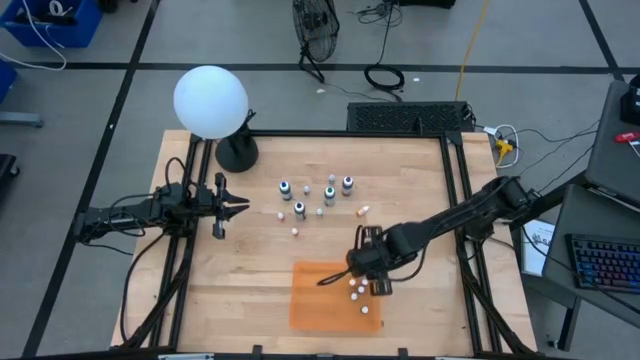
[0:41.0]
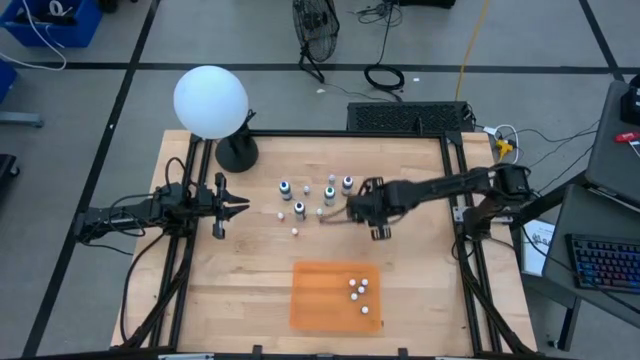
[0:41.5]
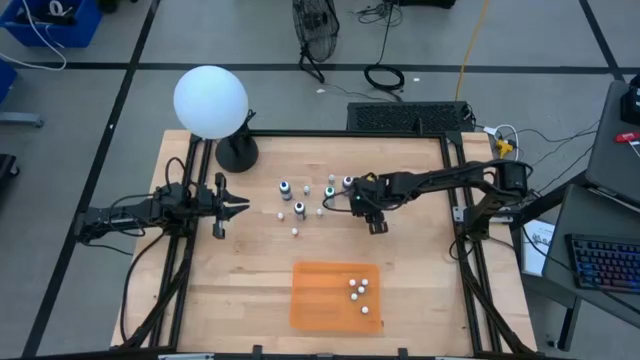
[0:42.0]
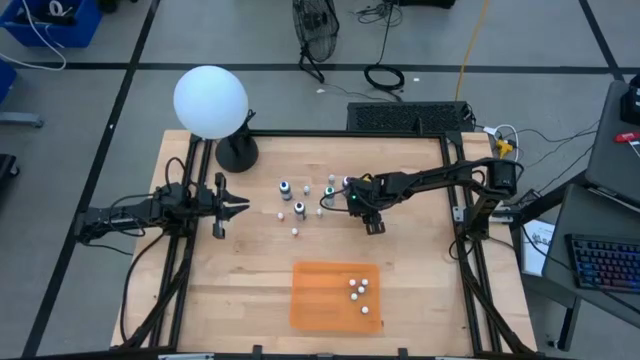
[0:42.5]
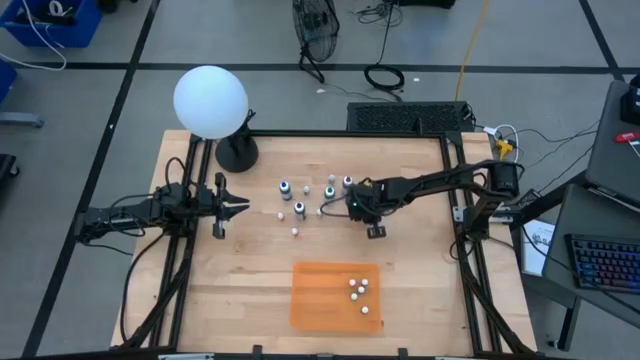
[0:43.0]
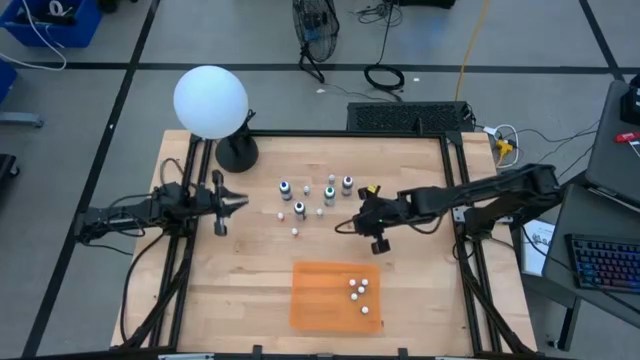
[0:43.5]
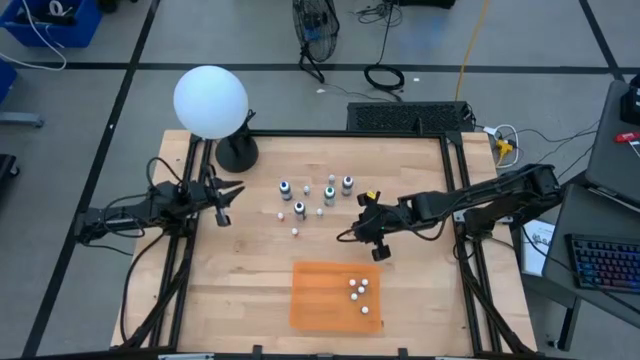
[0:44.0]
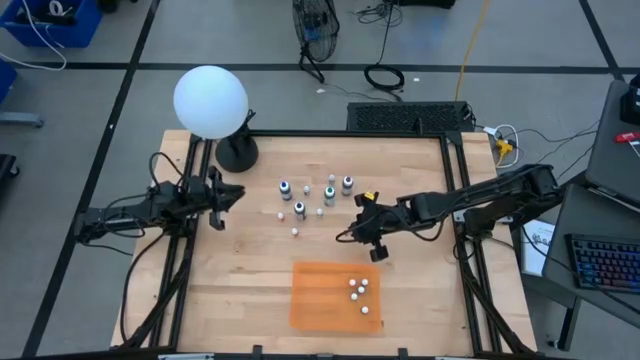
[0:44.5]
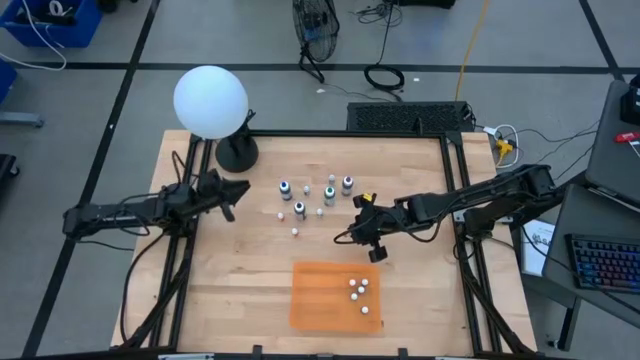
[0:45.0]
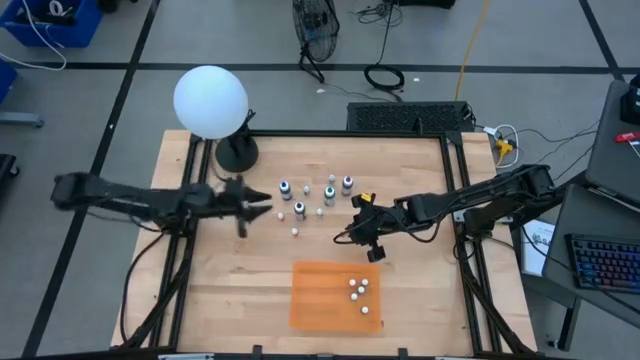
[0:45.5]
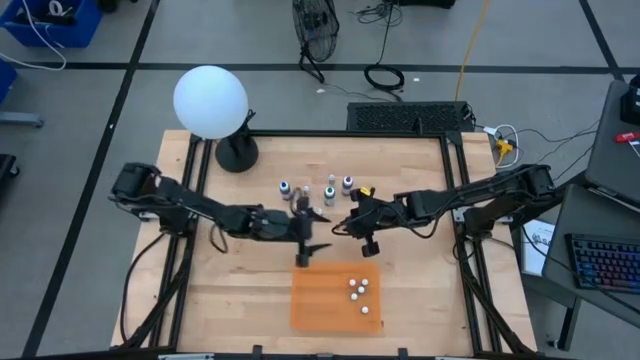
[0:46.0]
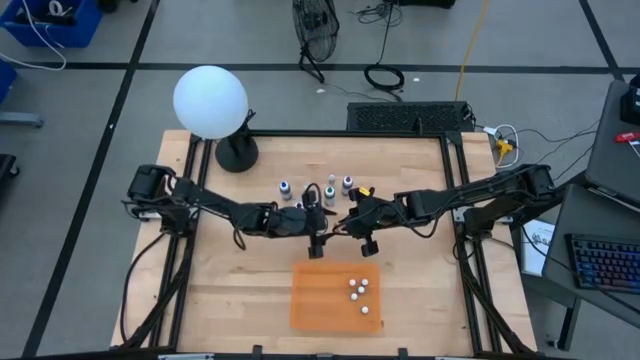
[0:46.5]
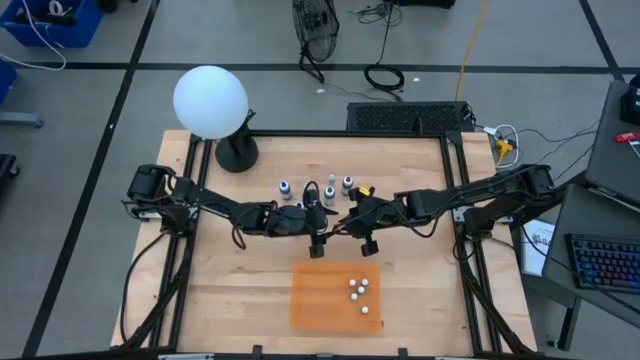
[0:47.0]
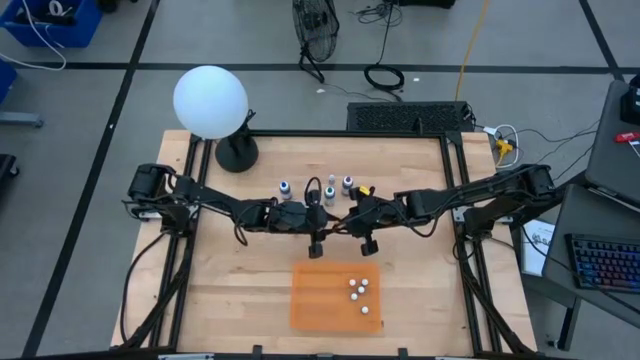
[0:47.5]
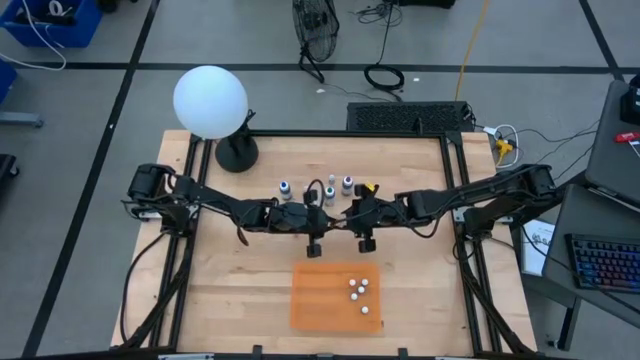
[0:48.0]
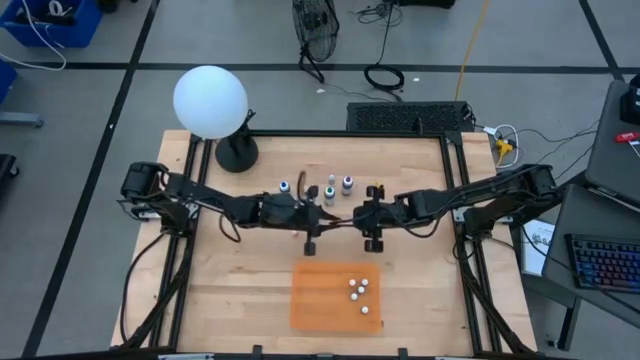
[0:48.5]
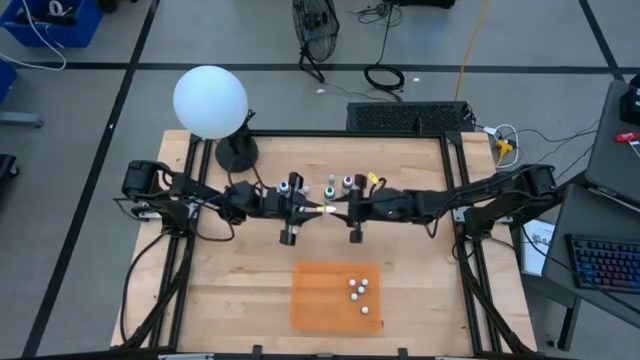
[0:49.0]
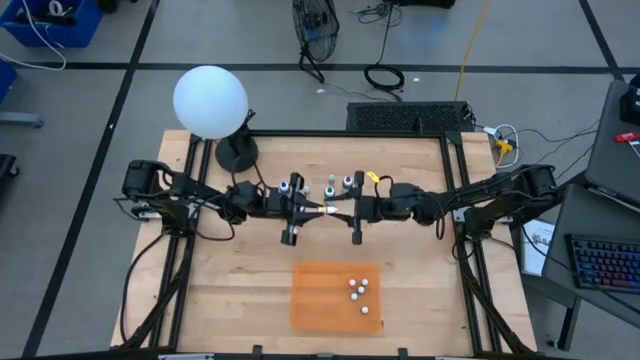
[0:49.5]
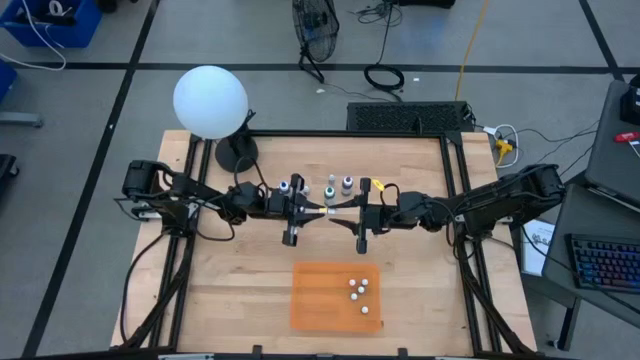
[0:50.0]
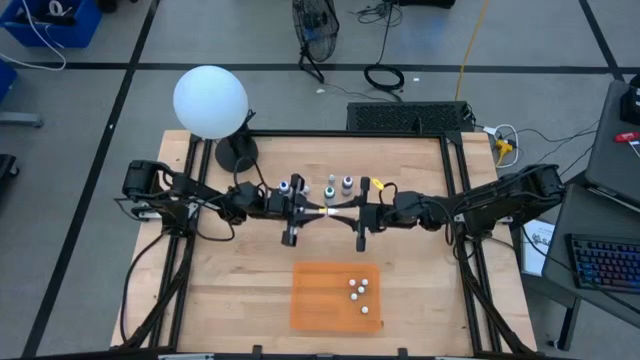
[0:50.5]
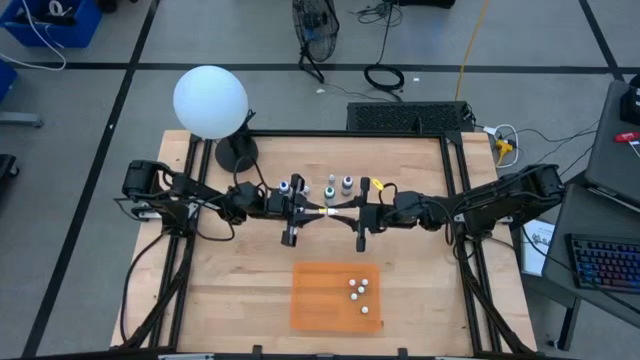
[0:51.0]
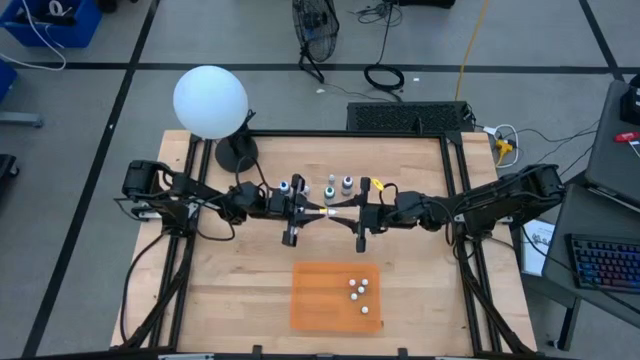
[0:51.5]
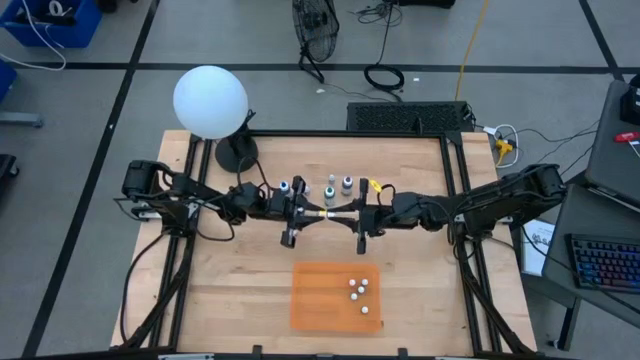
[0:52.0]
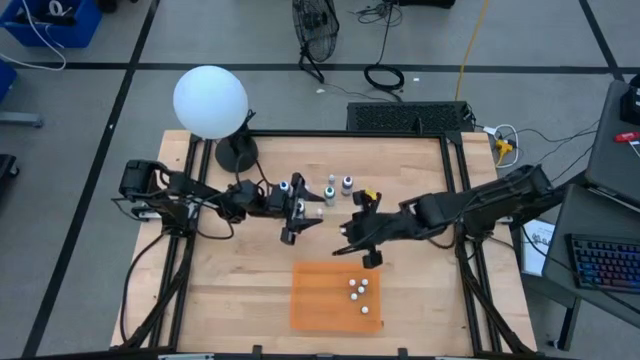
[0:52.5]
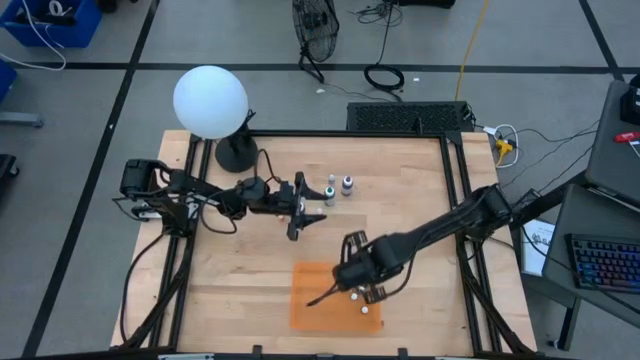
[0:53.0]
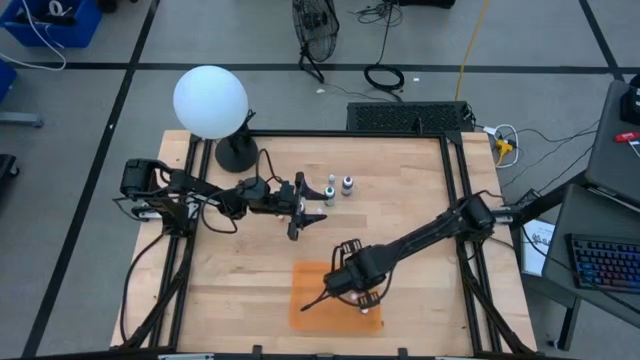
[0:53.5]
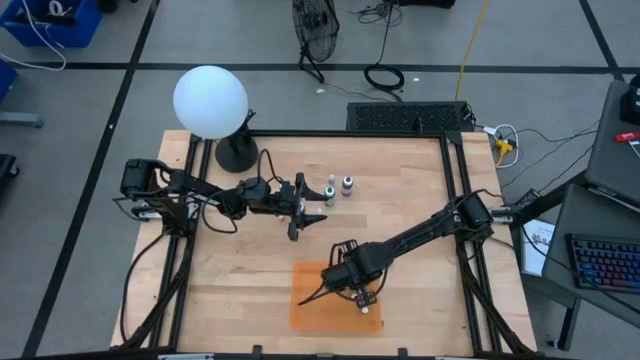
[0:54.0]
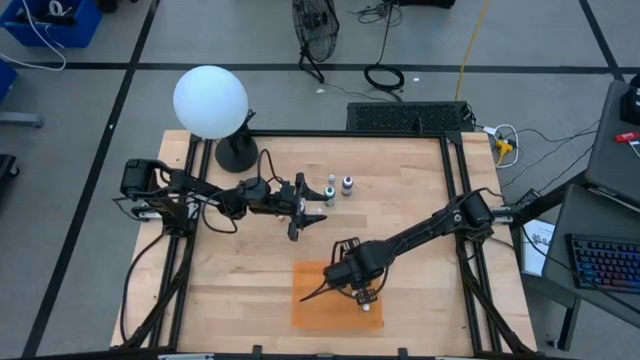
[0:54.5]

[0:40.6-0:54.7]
Task: Pick & Place food coloring
Put the small orange food coloring bottle into the orange container

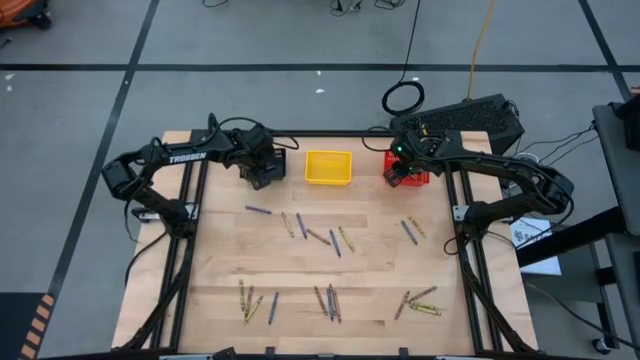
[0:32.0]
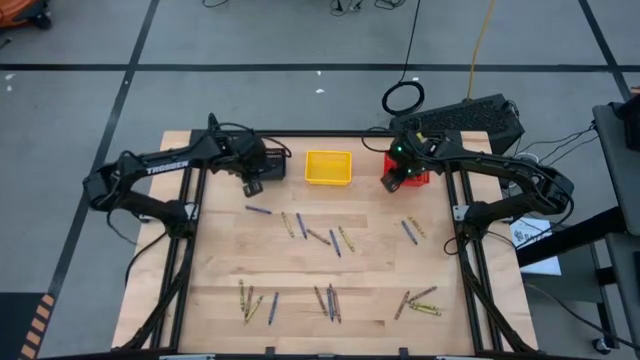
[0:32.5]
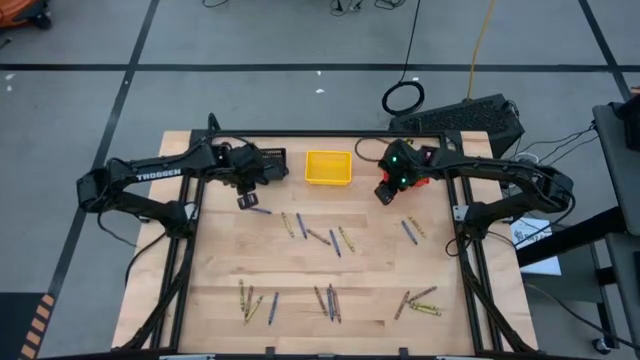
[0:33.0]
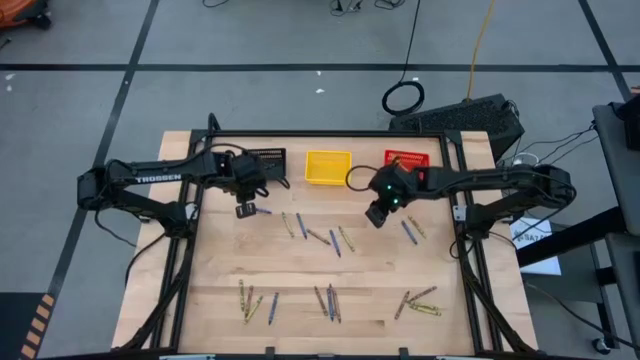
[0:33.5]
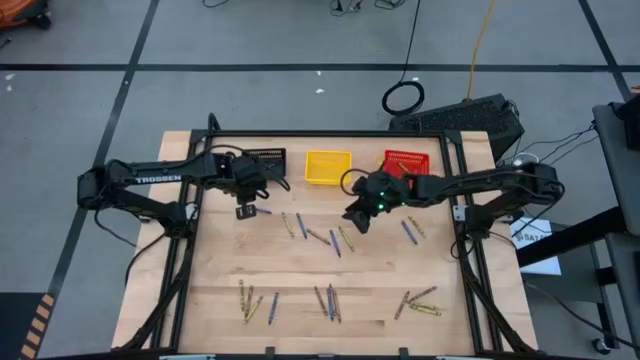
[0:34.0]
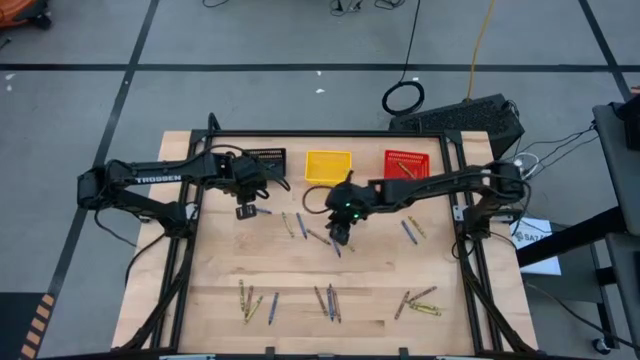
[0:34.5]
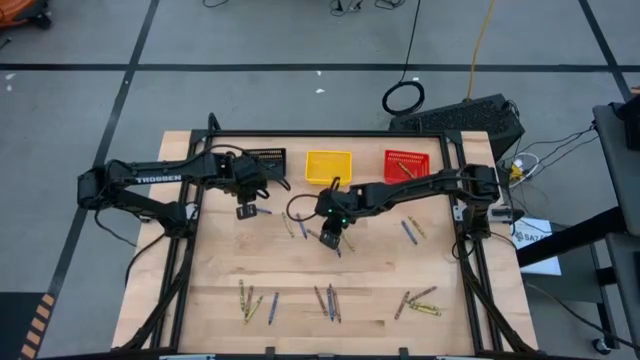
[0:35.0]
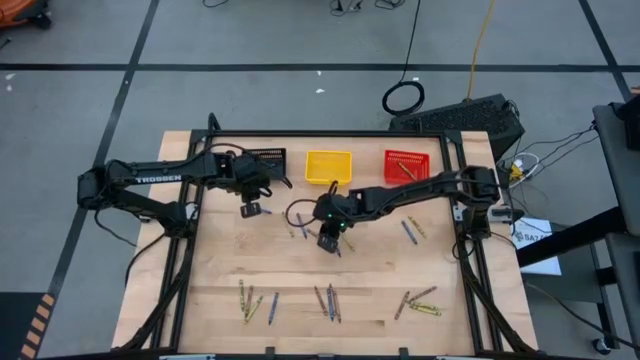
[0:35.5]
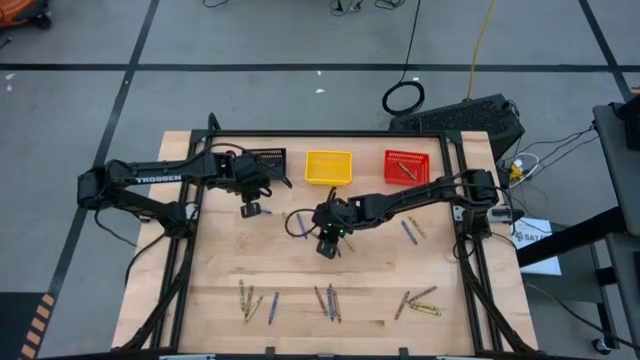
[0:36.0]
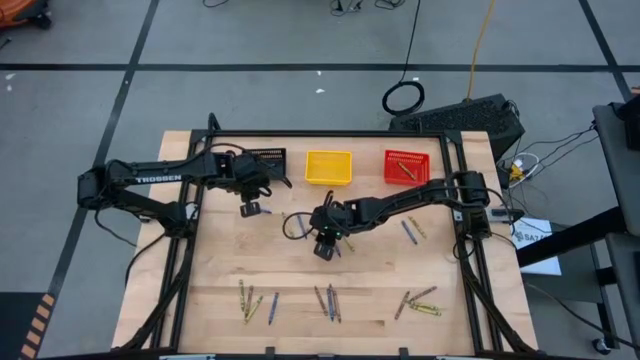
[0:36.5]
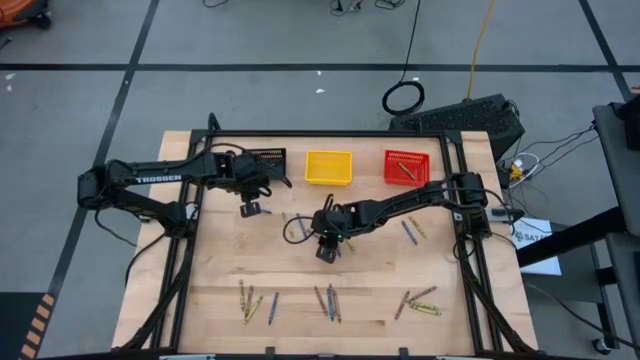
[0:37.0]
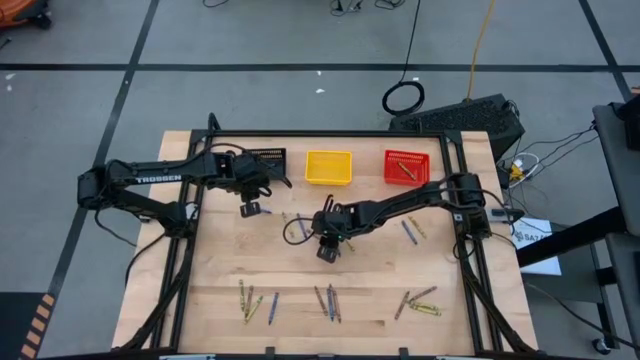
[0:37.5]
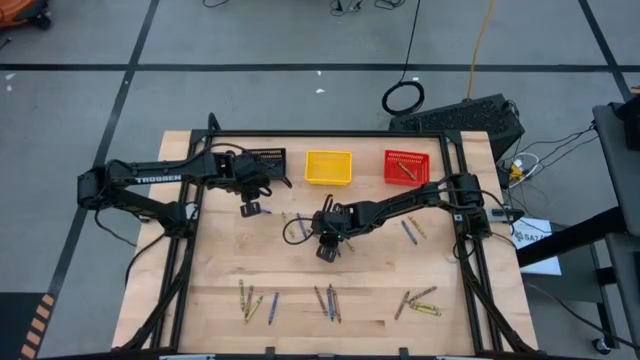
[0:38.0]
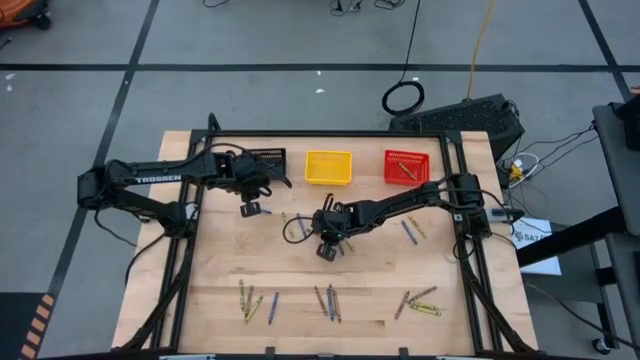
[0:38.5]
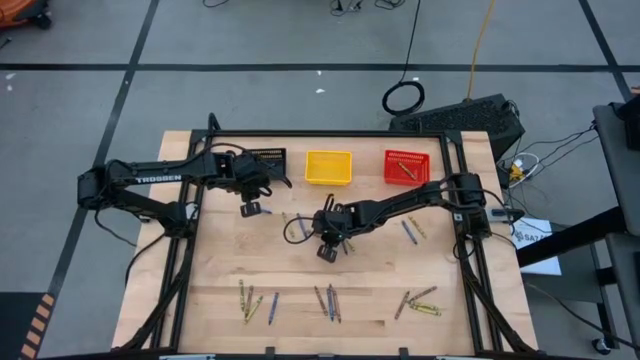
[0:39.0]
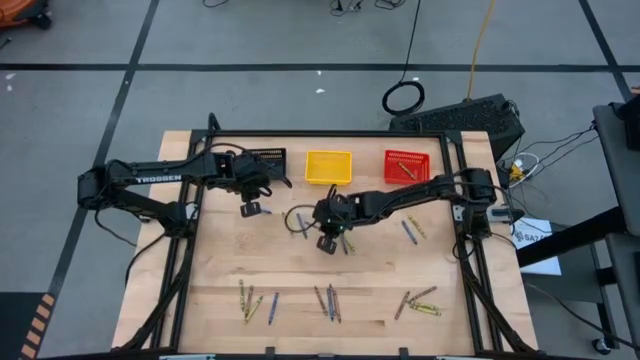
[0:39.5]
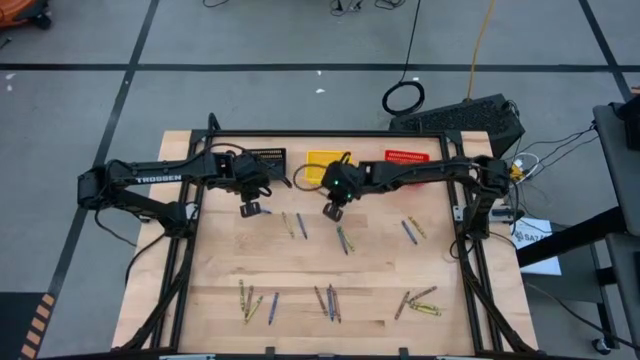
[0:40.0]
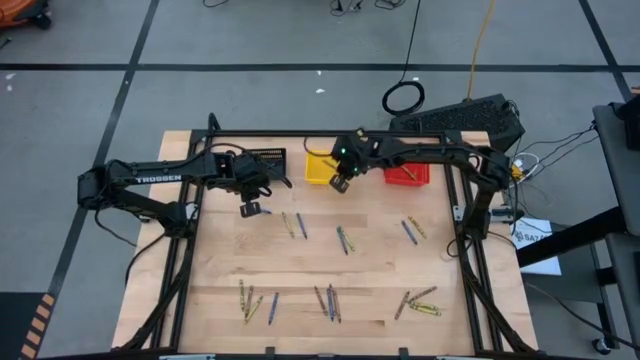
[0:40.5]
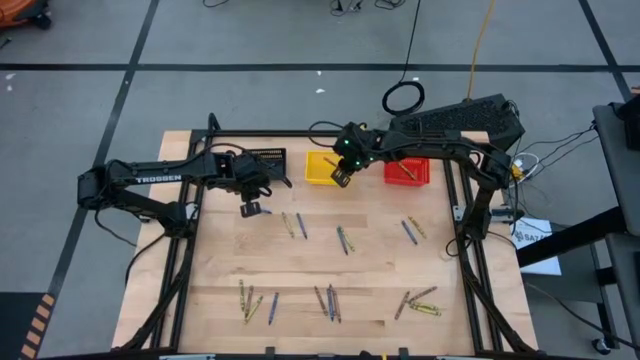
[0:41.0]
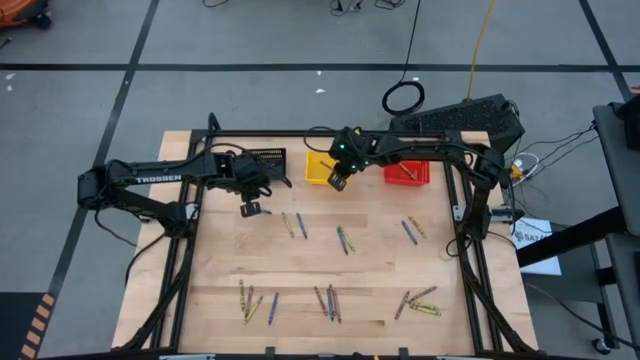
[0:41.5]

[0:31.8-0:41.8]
Task: Sort crayons
Put the brown crayon into the yellow bin
